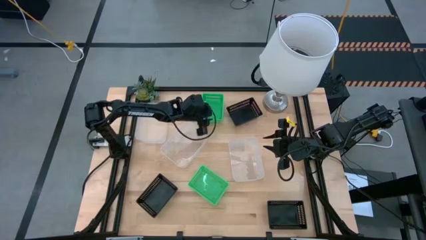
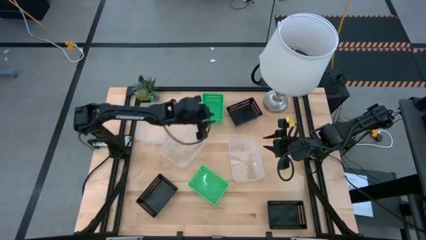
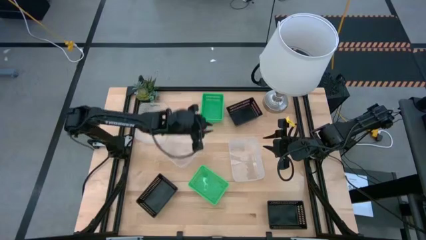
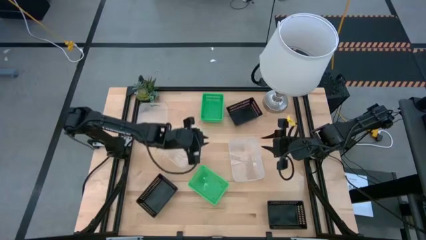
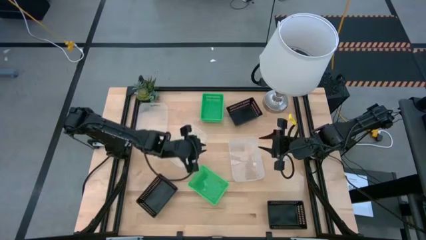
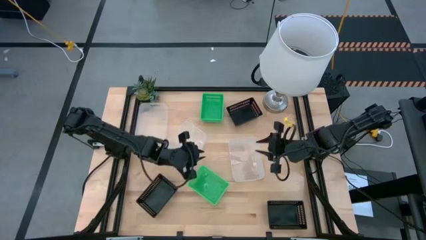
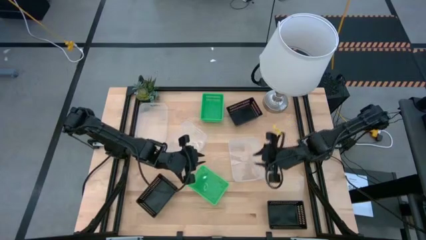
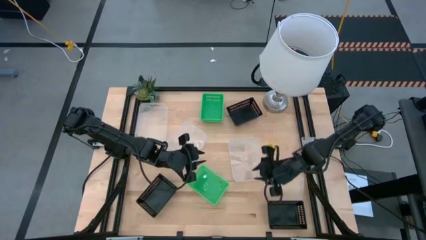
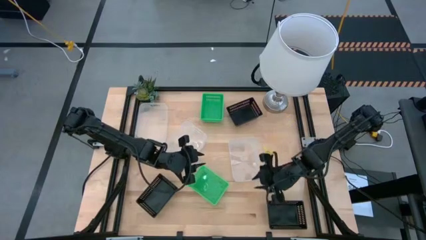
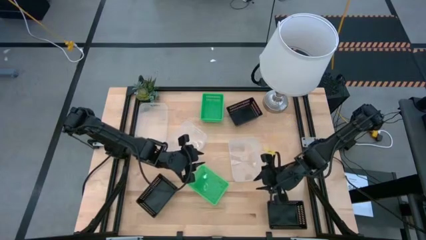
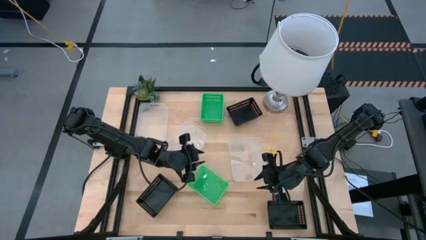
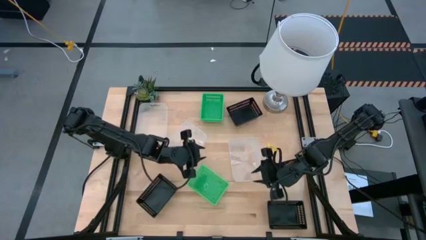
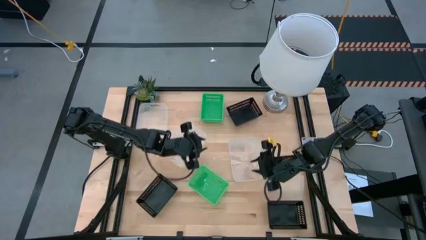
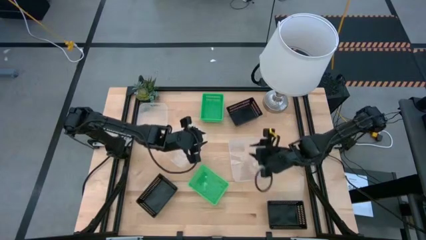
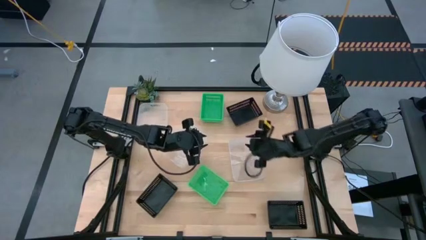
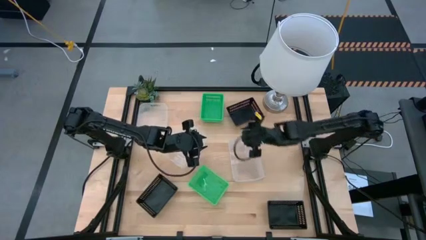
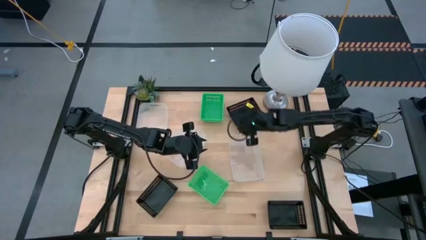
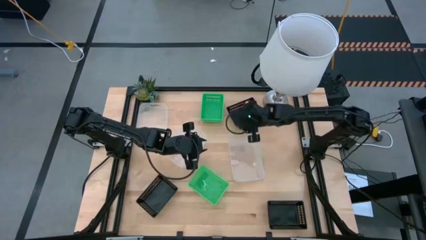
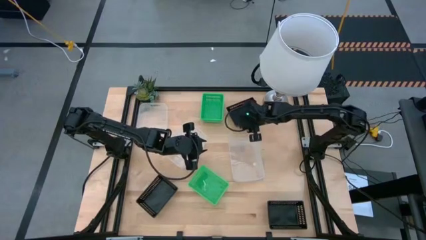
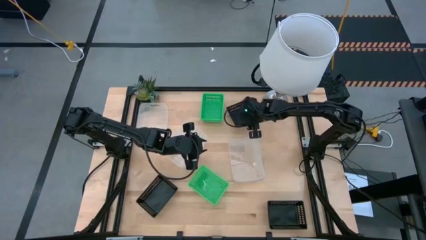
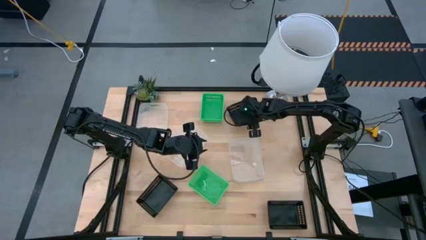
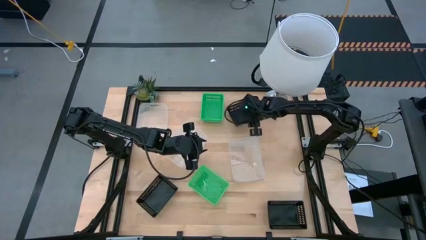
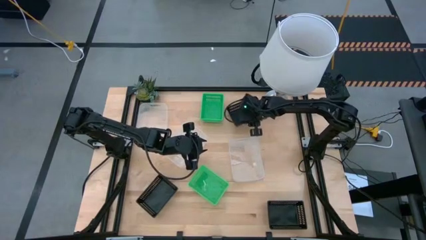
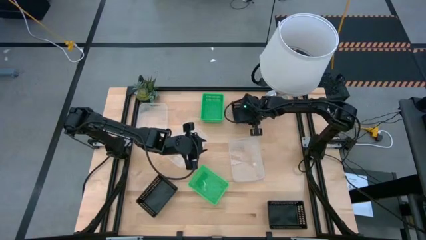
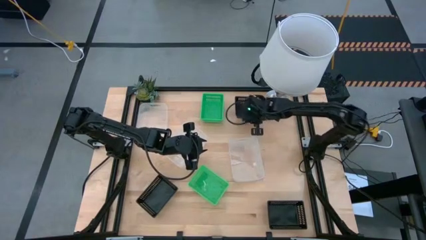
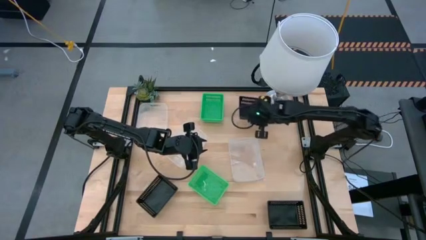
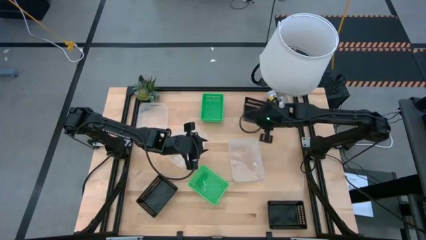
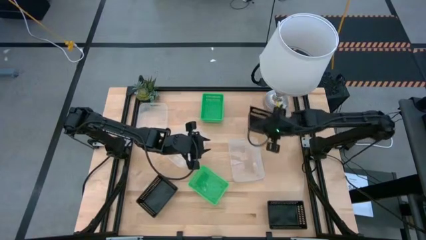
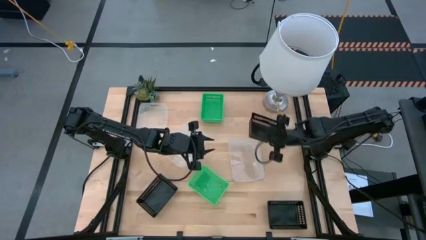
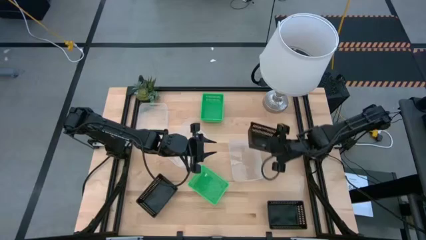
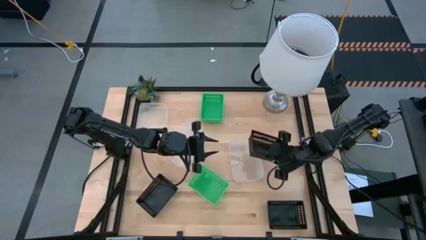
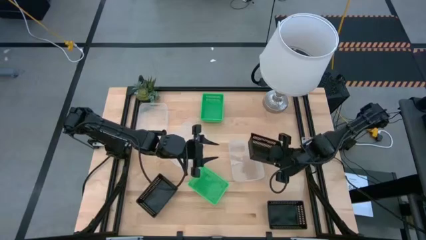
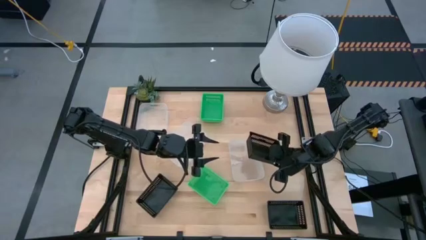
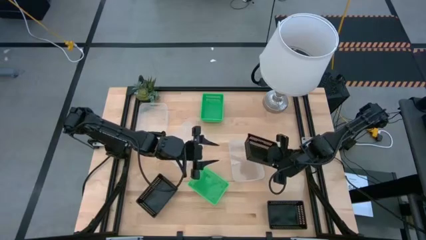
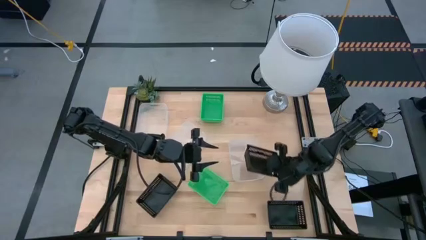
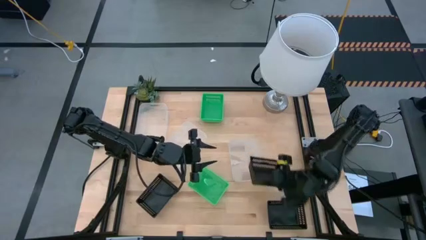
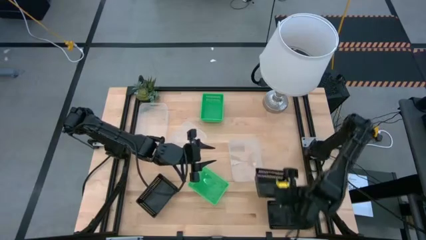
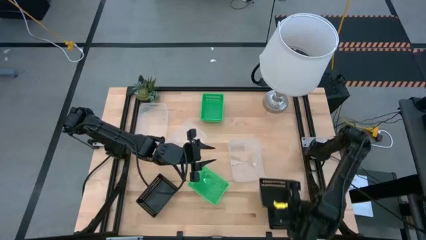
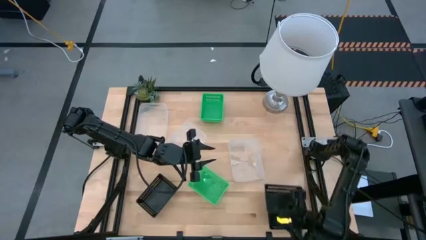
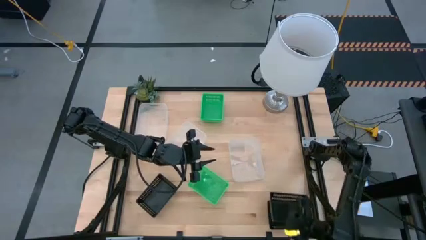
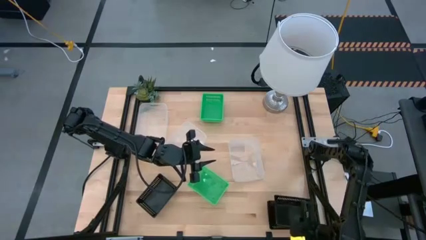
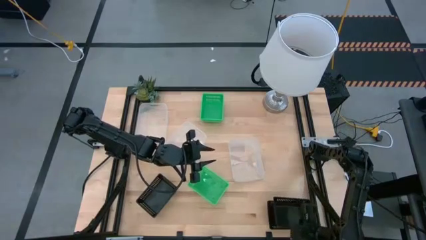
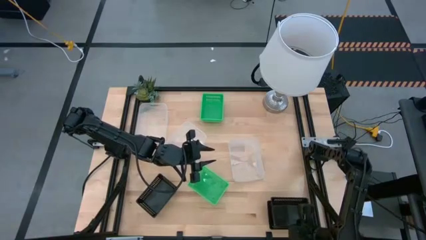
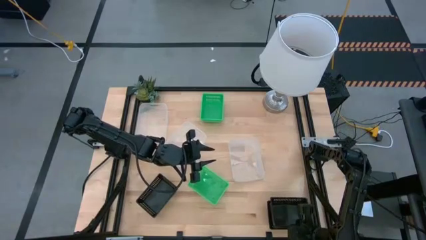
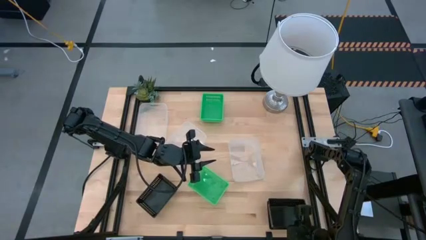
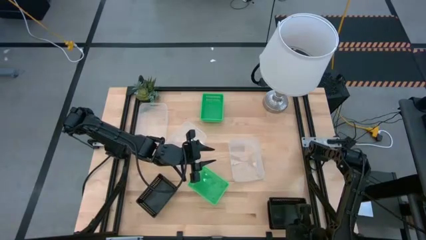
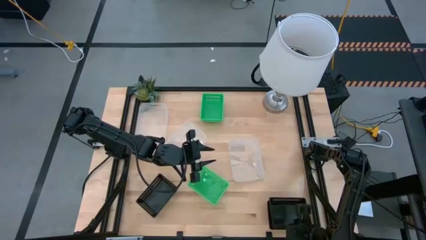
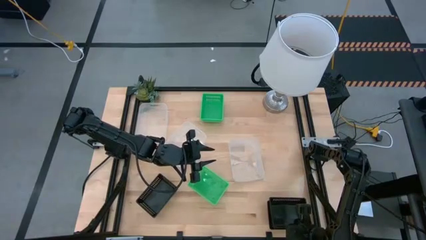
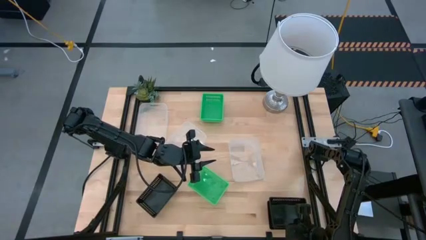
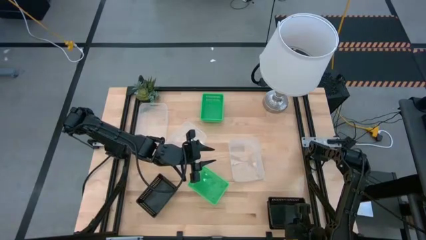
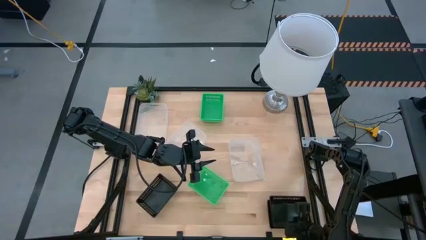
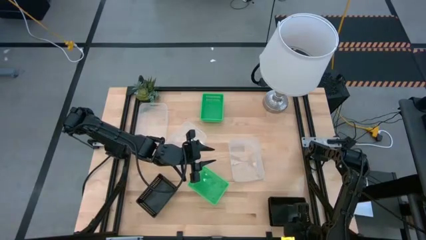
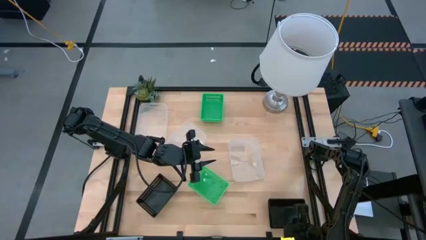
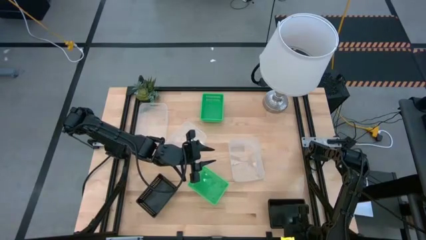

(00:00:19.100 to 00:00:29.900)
Stack the top black bin on top of the bottom right black bin
